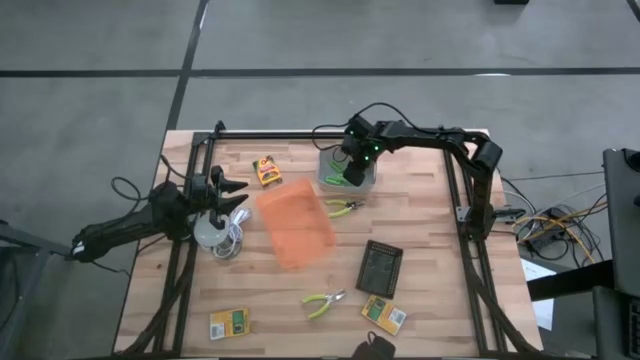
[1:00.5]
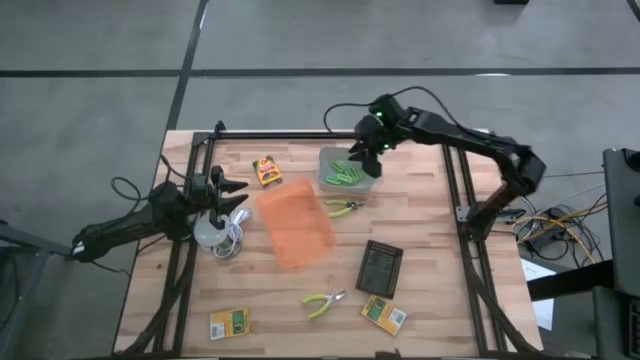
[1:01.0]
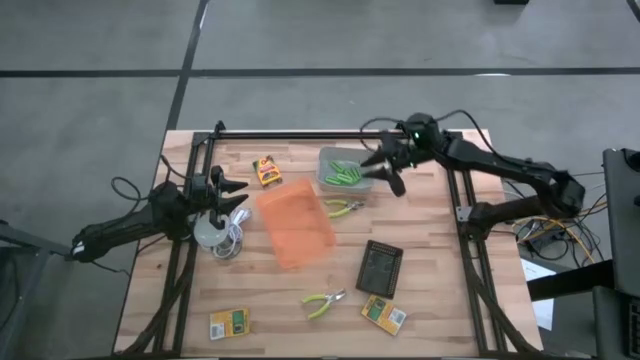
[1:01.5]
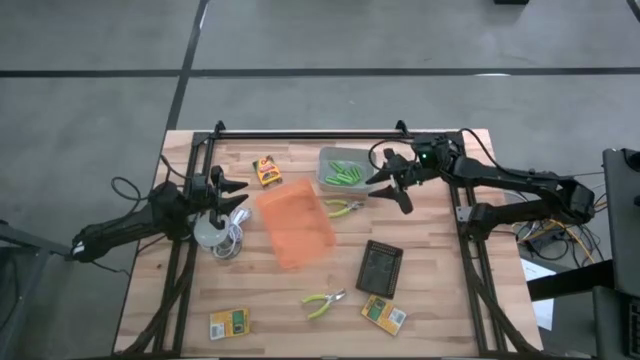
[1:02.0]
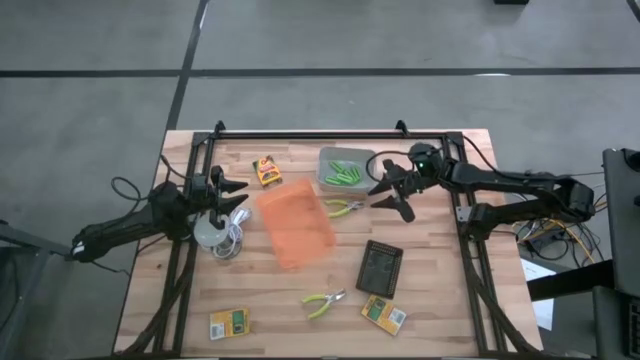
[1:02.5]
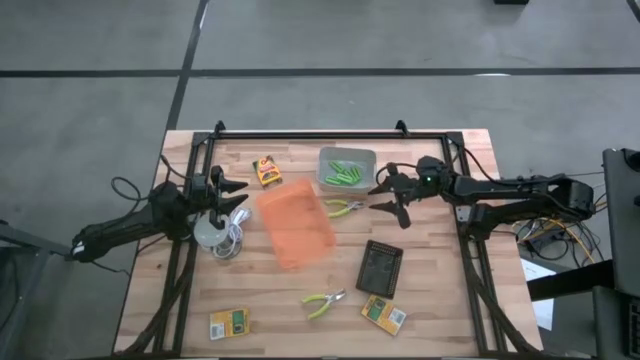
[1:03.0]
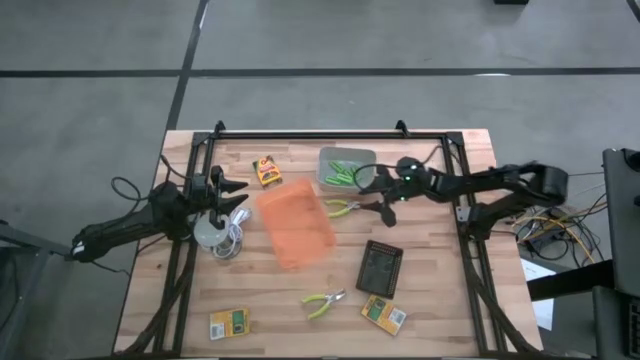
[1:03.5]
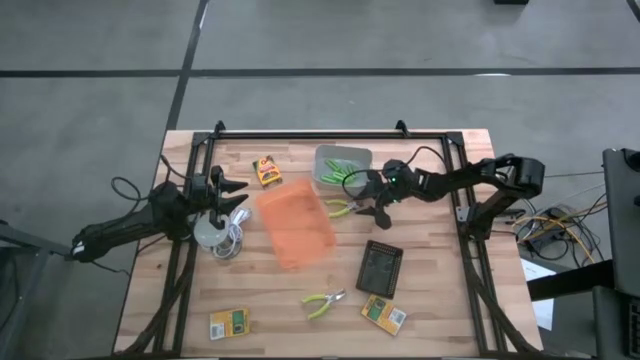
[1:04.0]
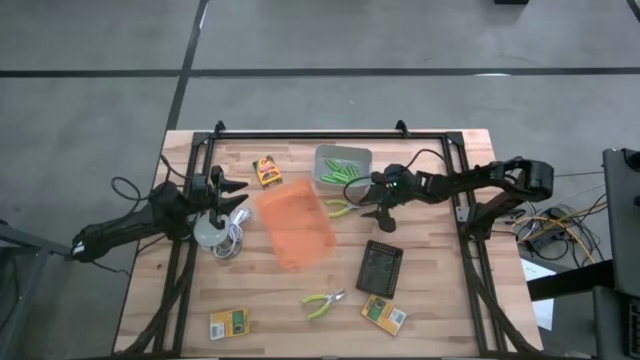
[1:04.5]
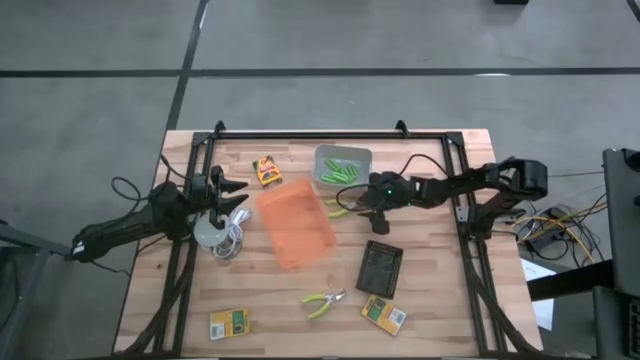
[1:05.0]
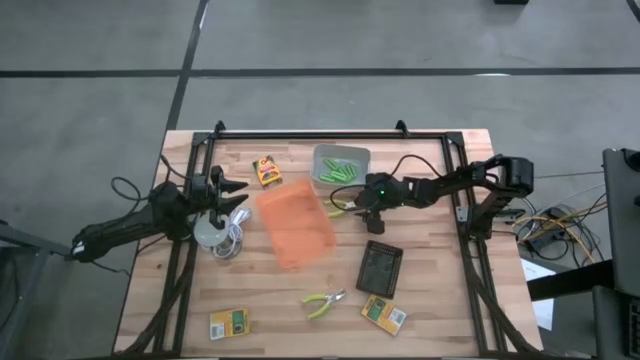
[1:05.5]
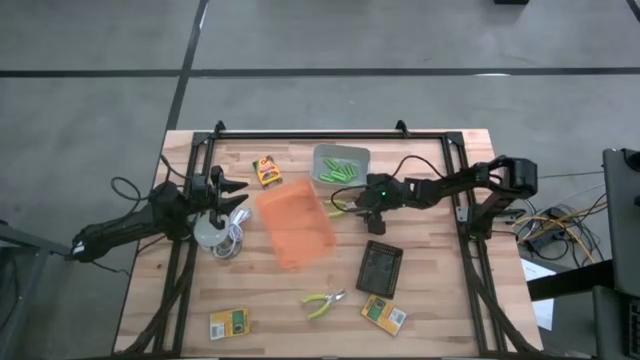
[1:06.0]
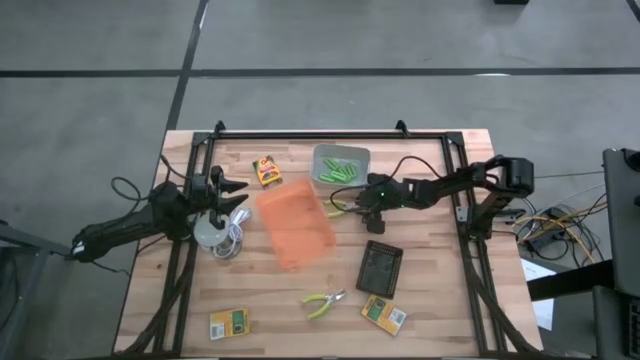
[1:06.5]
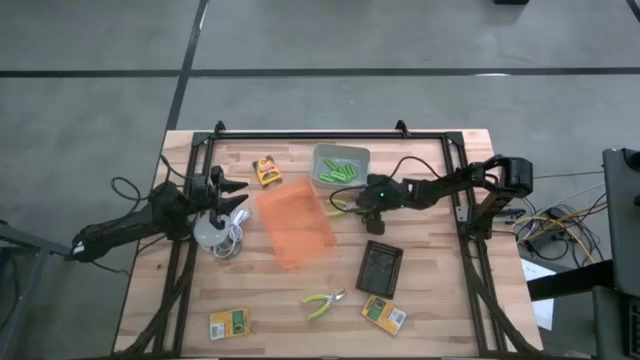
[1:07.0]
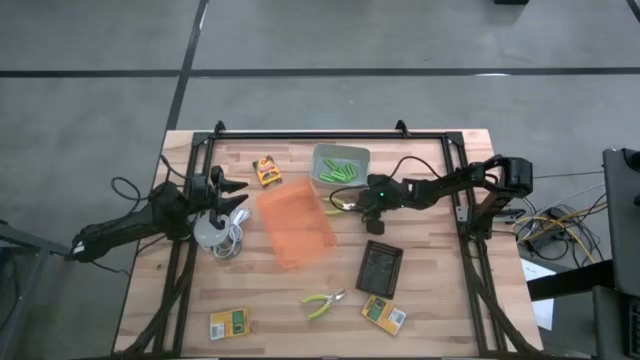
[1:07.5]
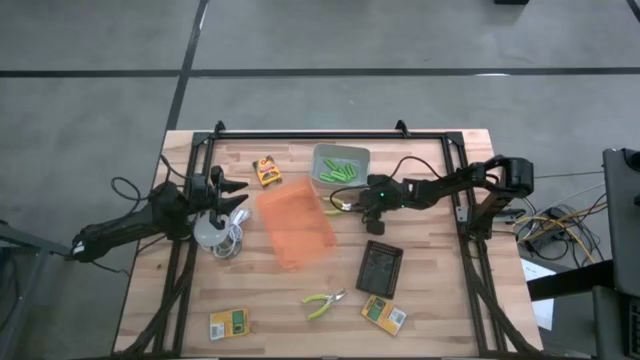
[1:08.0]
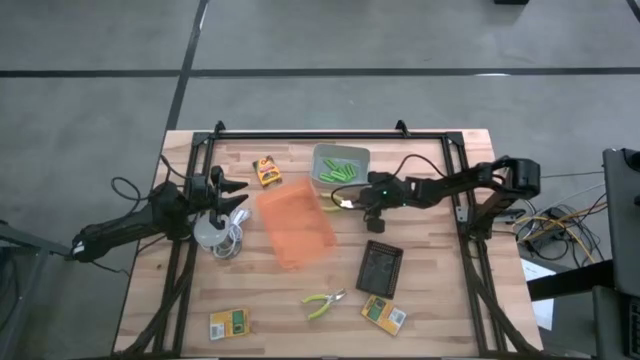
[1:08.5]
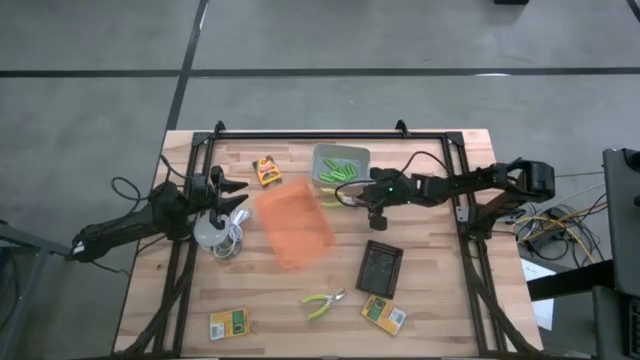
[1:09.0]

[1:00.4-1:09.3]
Task: Pick & Place School Supplies
Put the green hole puncher into the orange bin

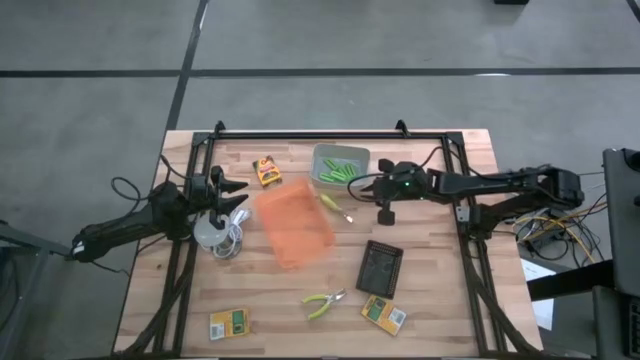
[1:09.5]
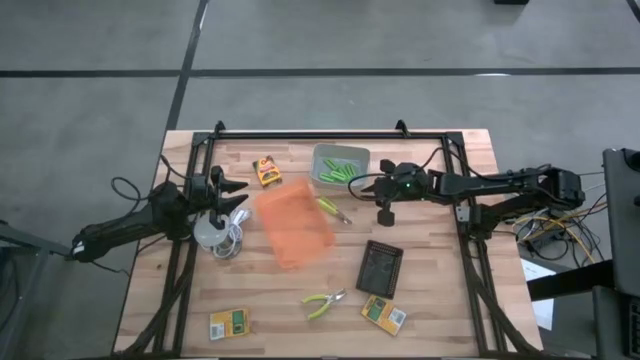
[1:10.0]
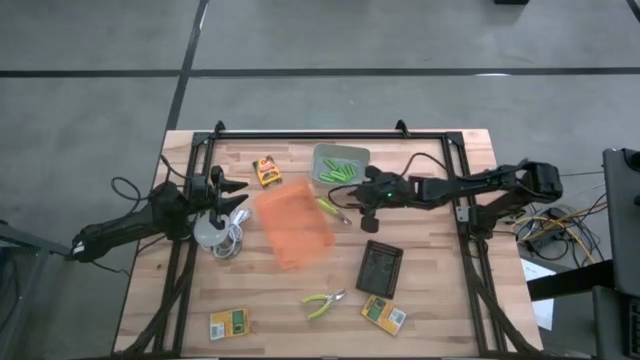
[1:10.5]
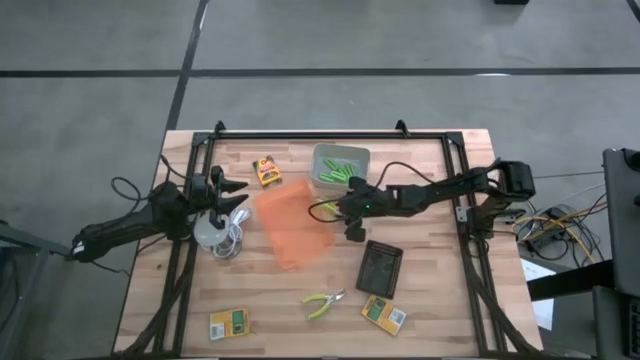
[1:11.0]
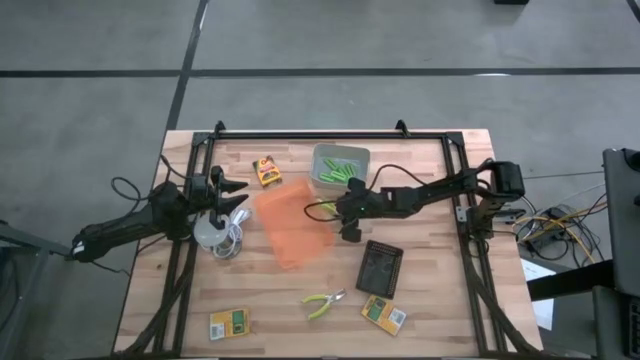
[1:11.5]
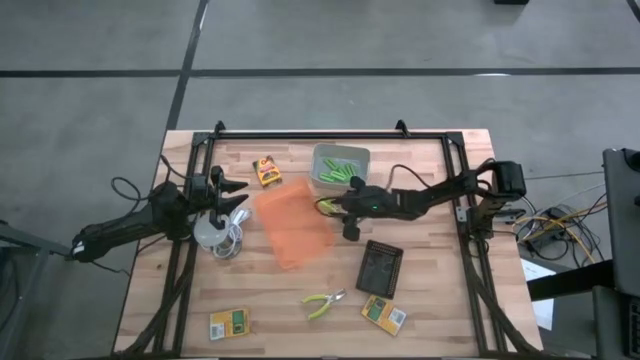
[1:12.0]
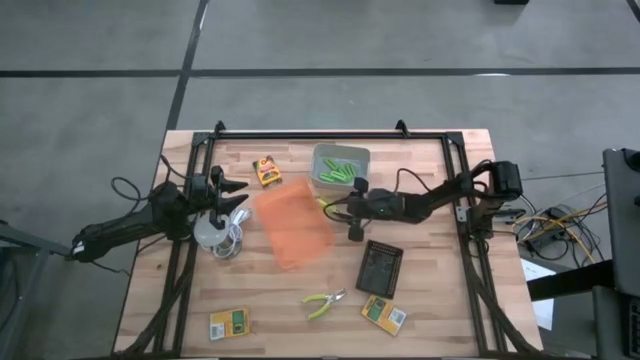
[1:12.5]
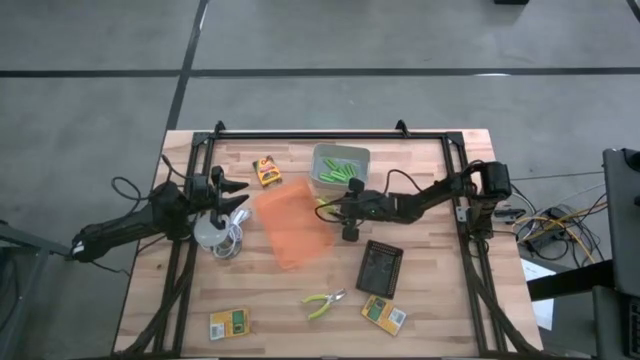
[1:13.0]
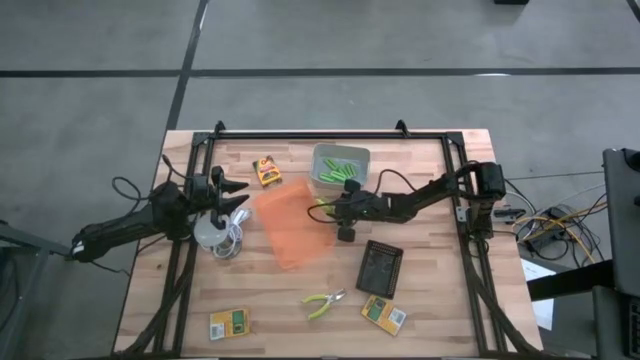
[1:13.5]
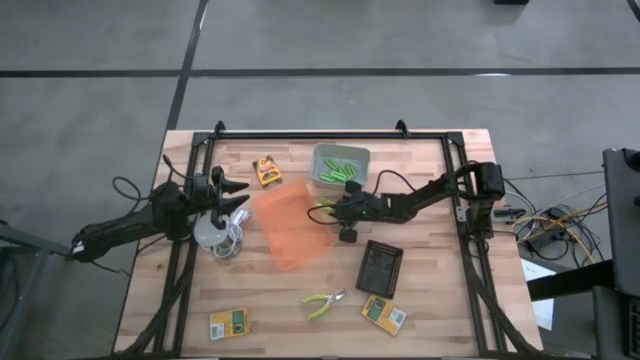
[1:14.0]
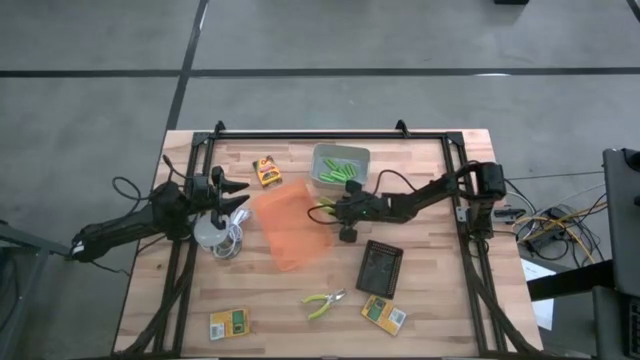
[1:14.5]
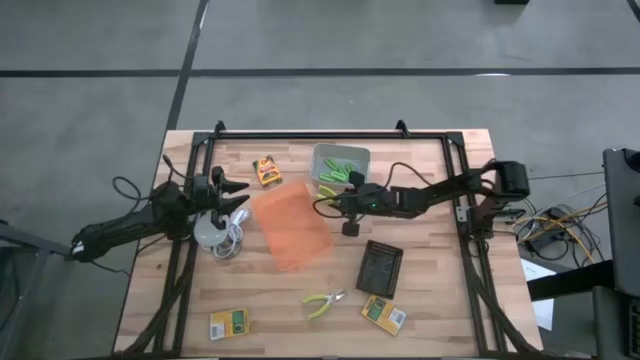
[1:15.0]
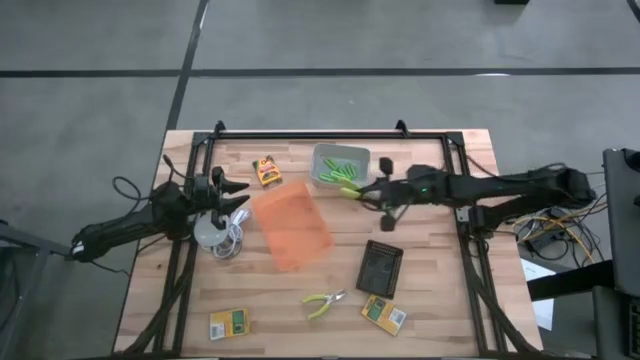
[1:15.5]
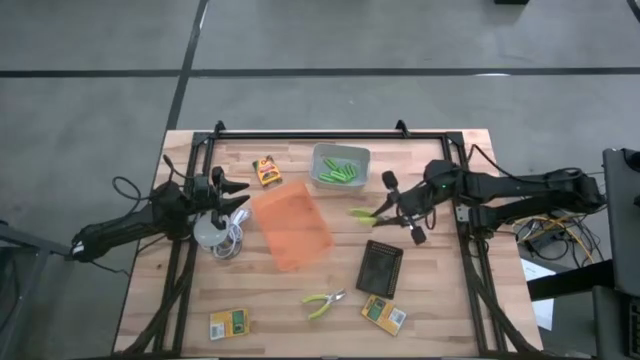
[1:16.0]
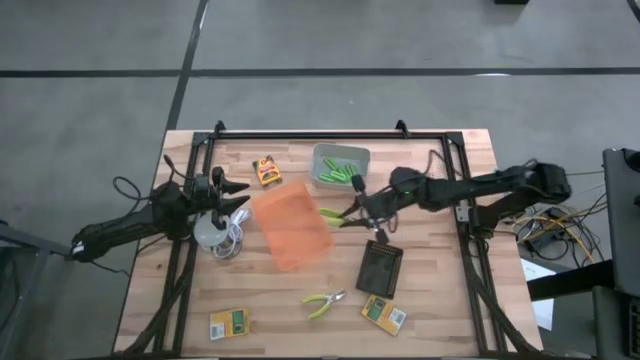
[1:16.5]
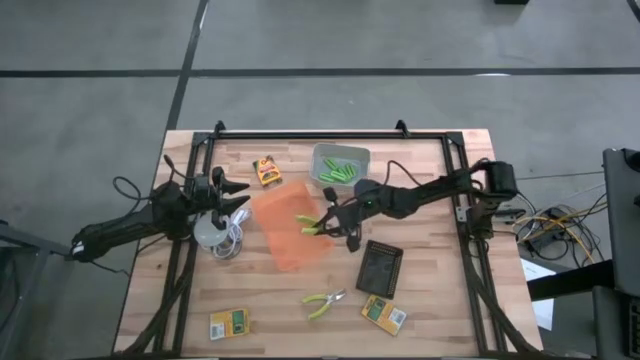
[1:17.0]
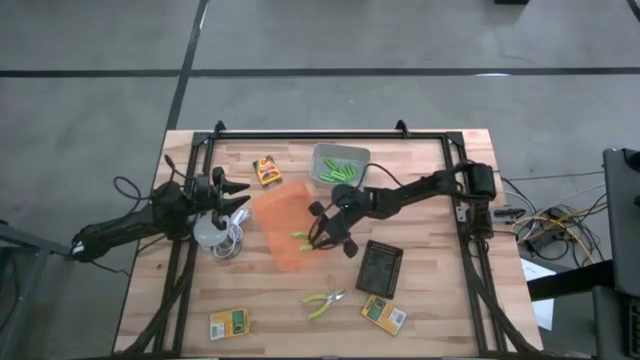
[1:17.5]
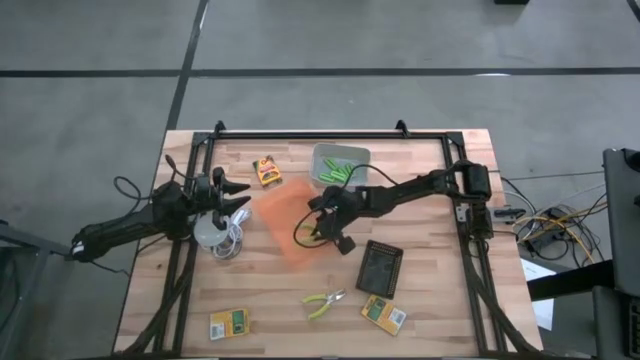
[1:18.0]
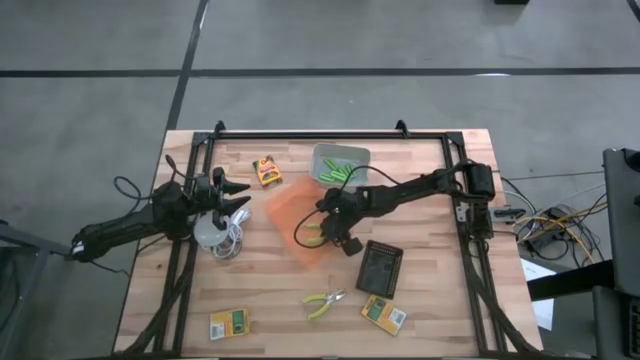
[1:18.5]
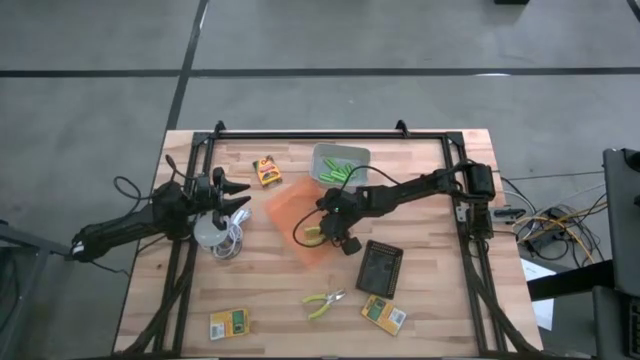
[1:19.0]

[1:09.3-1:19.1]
Put the green hole puncher into the orange bin

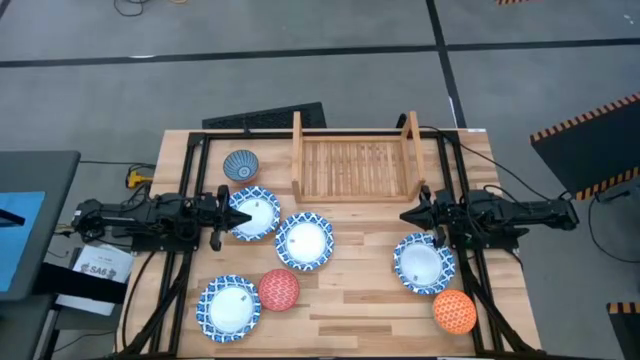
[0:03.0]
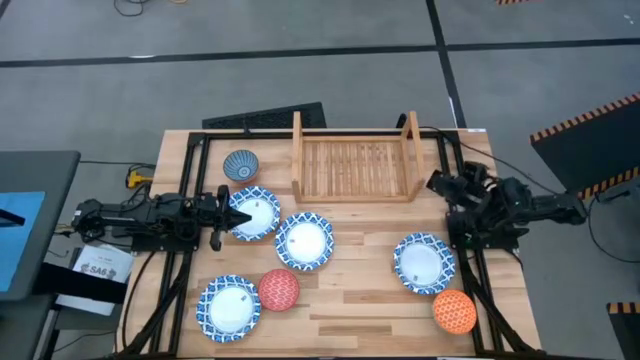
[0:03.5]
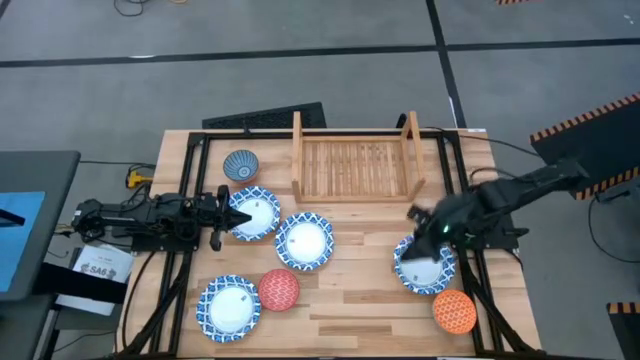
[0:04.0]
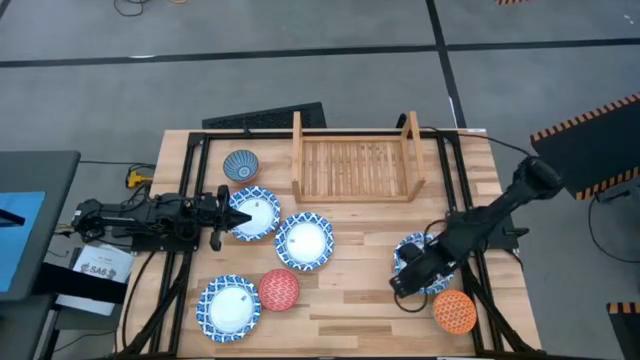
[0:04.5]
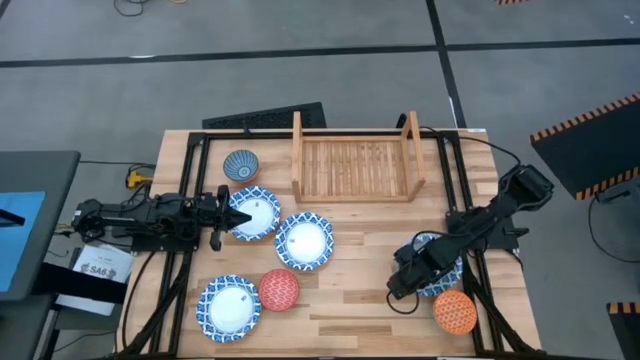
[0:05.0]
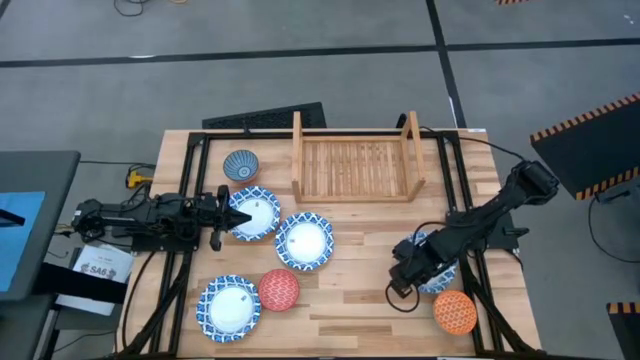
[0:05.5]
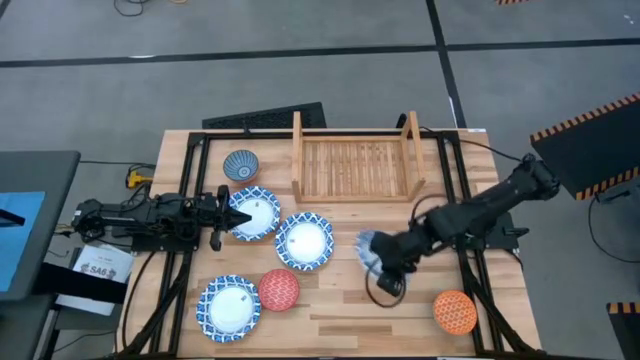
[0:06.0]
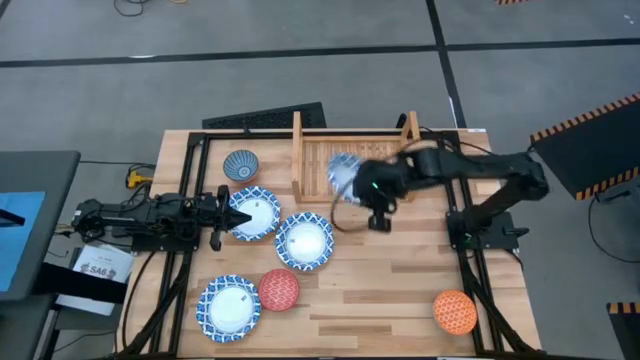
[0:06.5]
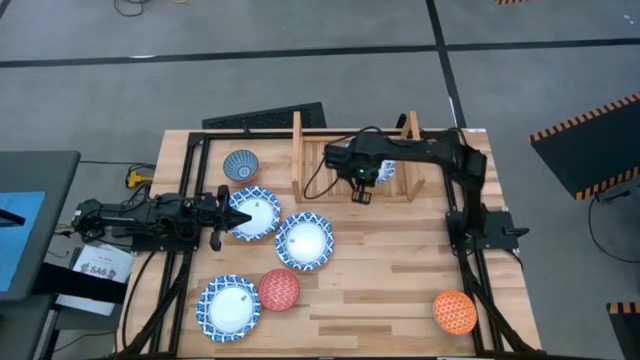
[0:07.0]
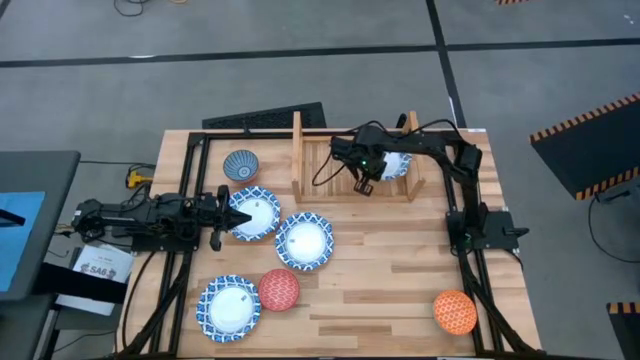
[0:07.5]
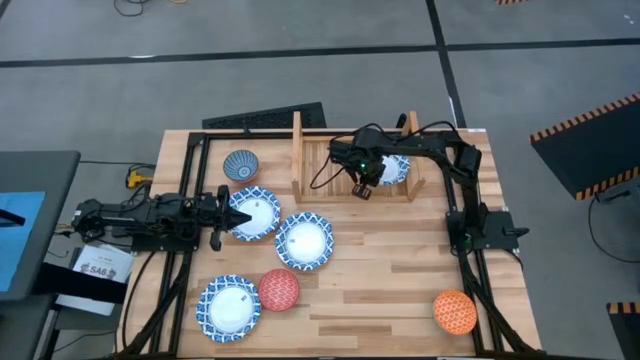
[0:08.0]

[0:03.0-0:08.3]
Task: Place and stack bowls onto a shelf
Put the blue pattern large bowl on the shelf
